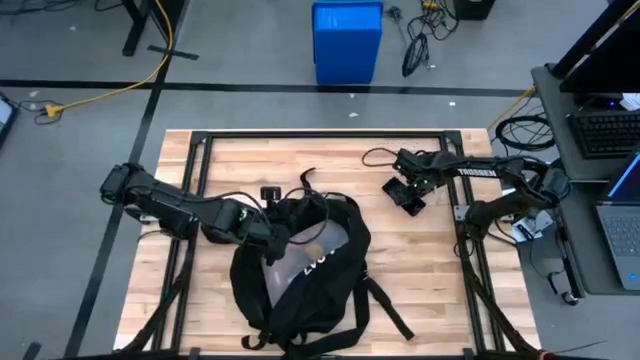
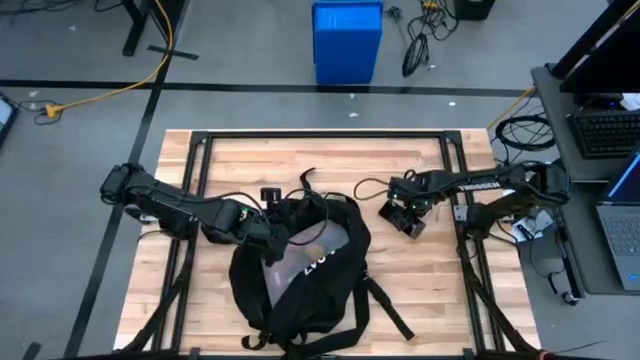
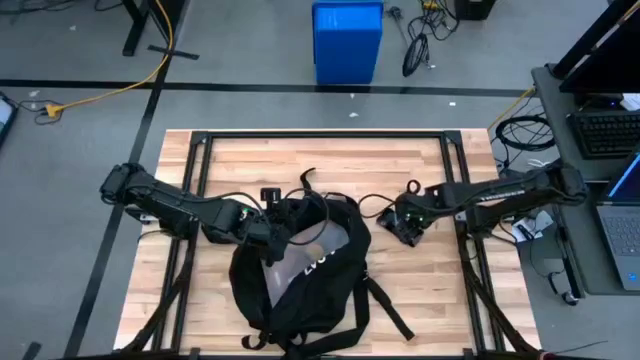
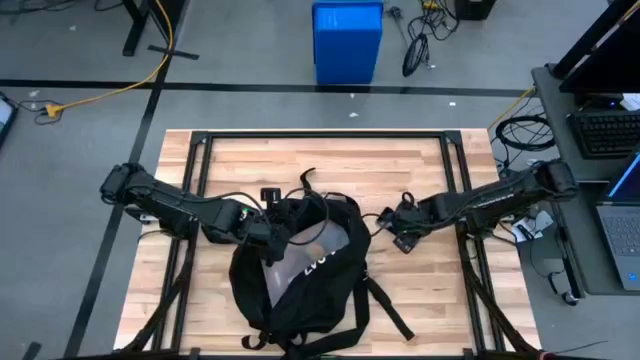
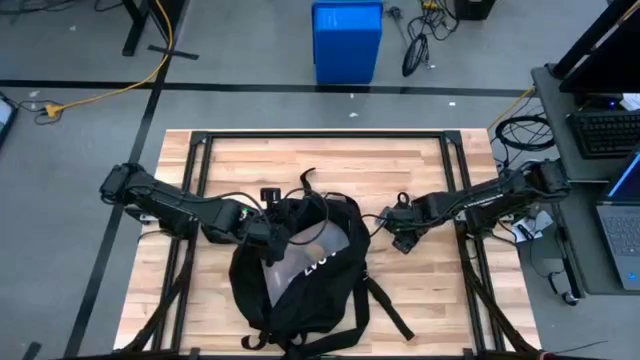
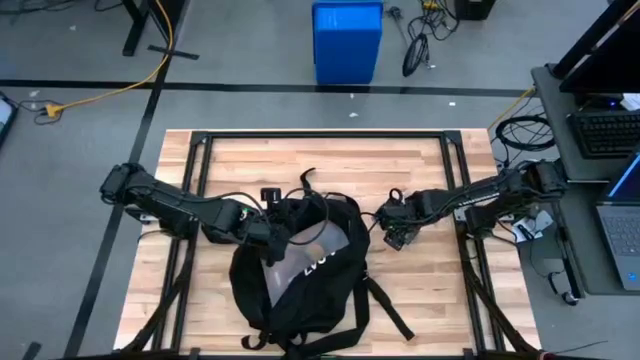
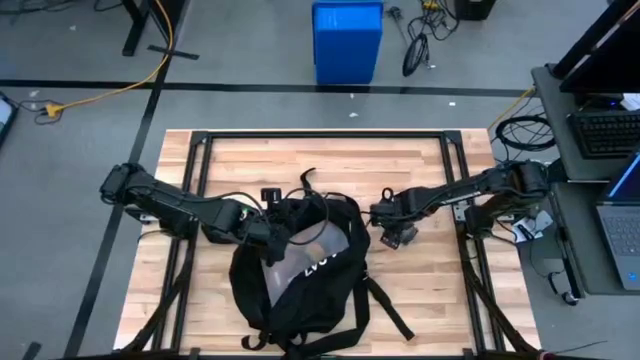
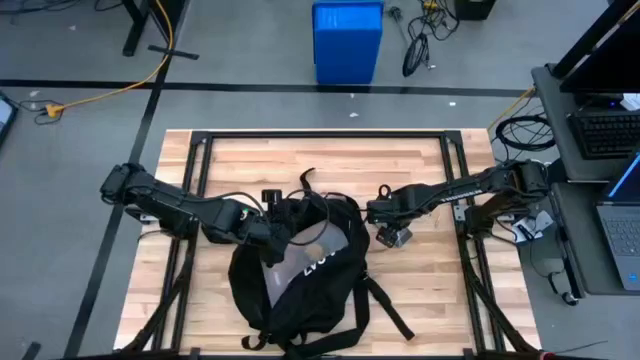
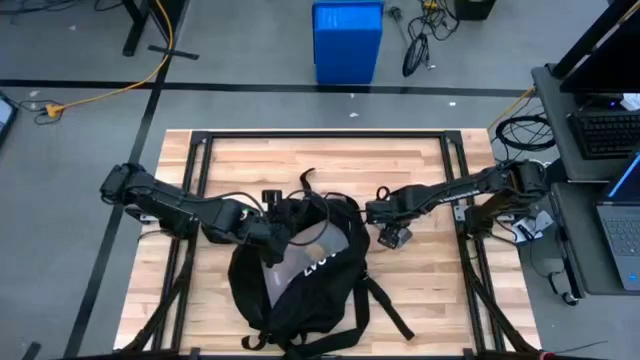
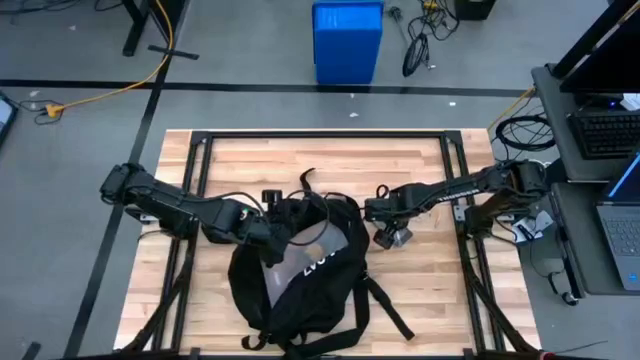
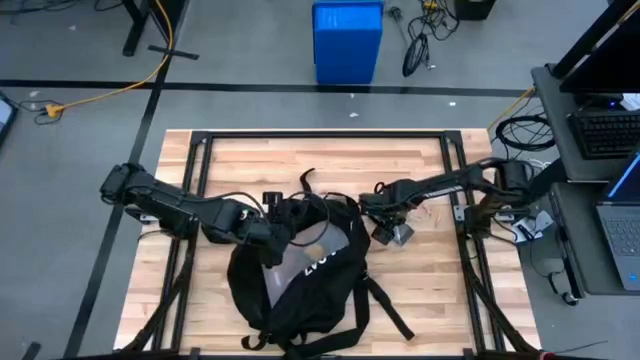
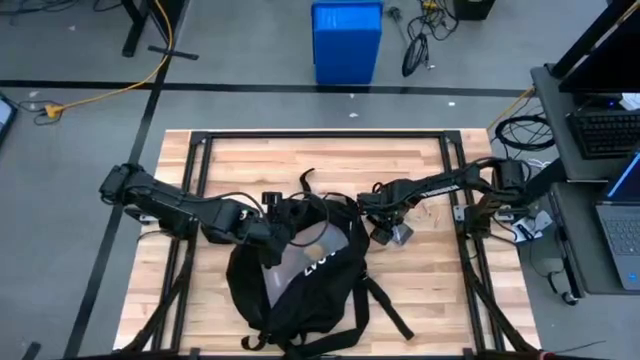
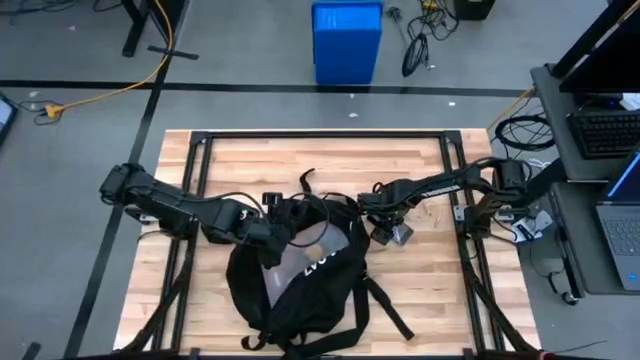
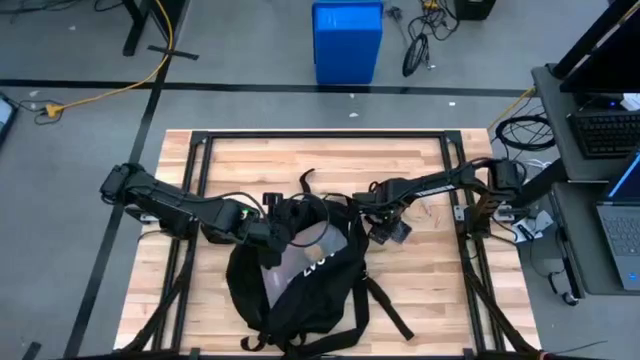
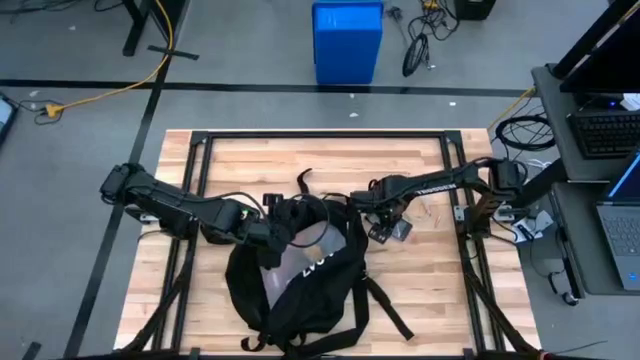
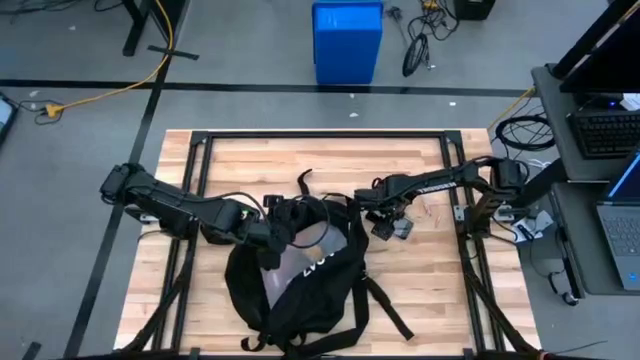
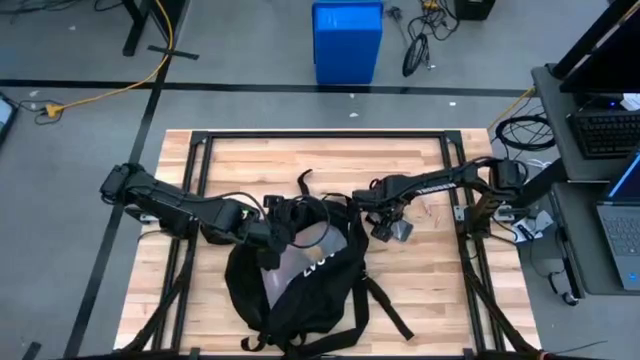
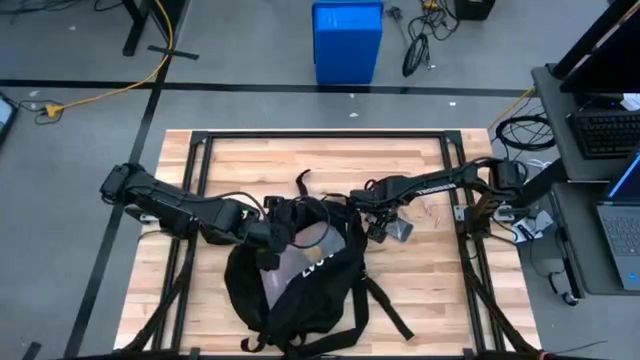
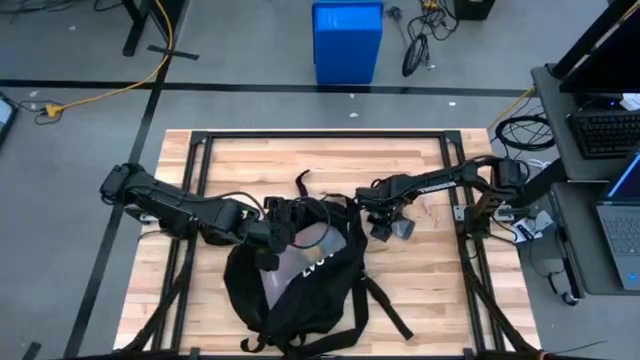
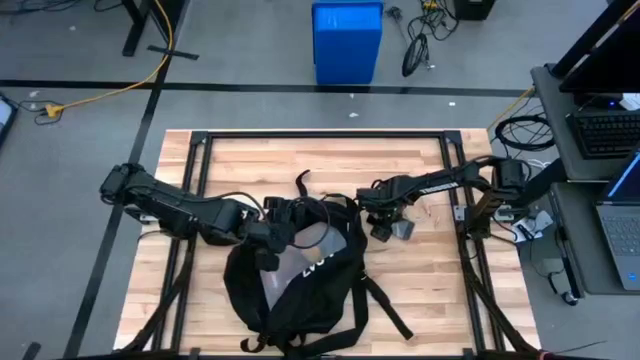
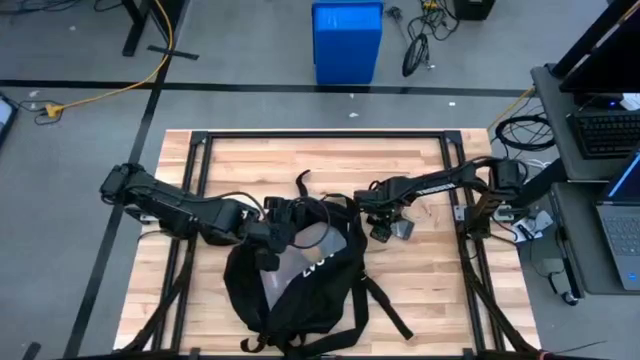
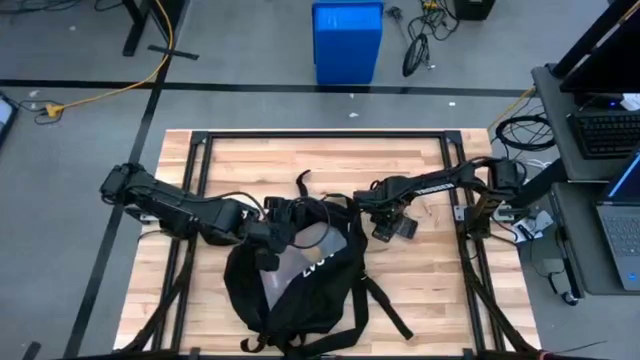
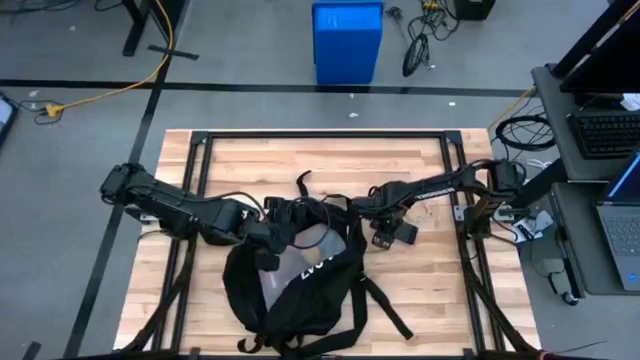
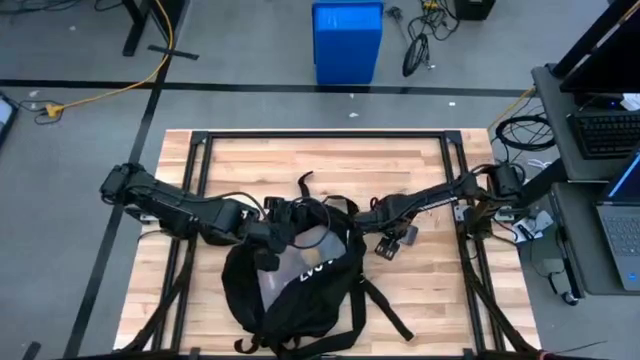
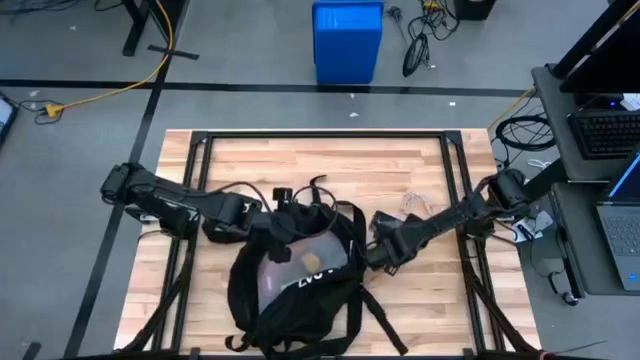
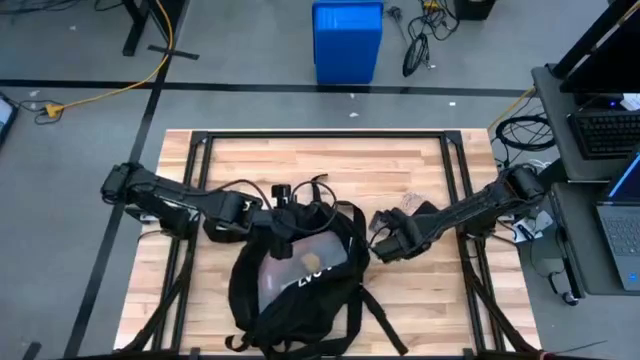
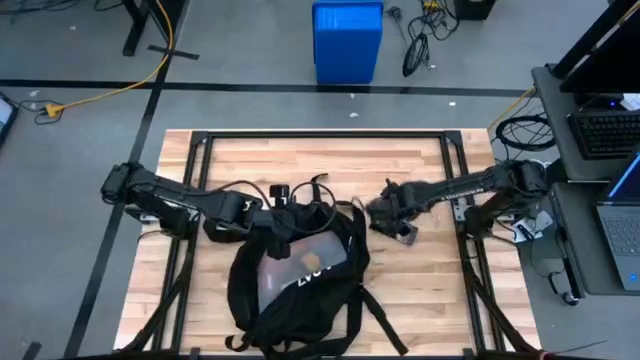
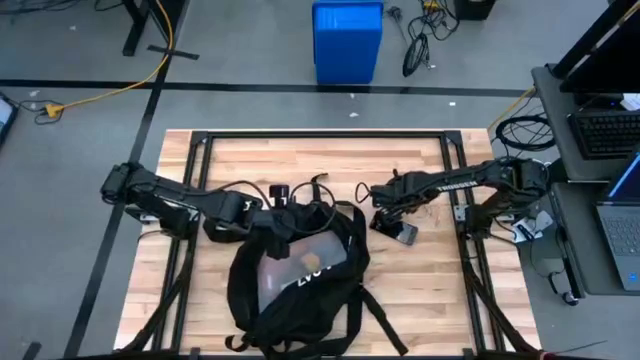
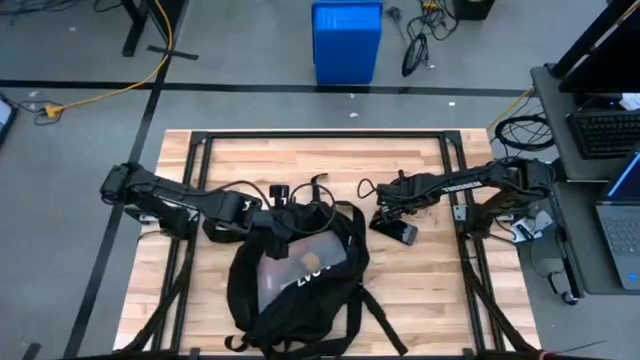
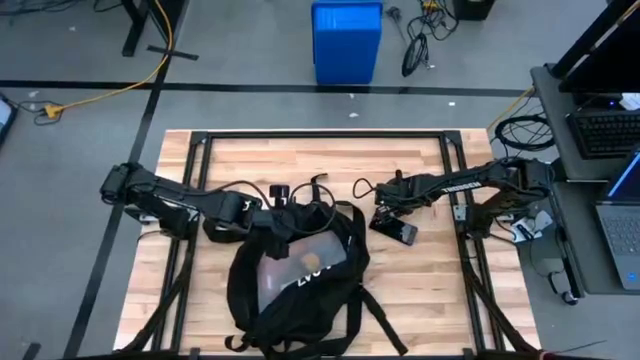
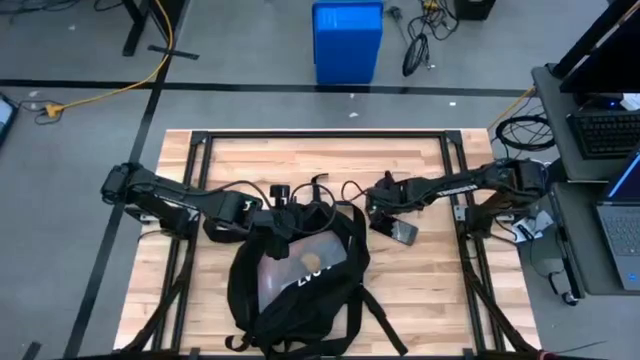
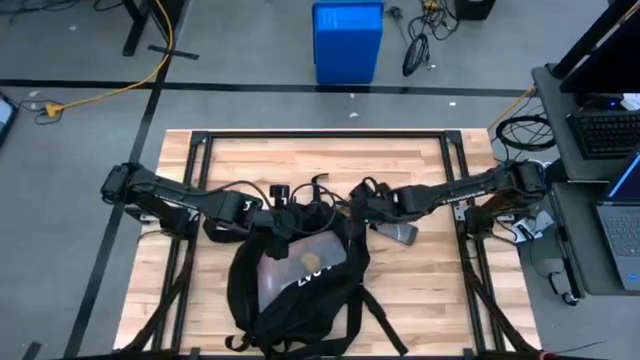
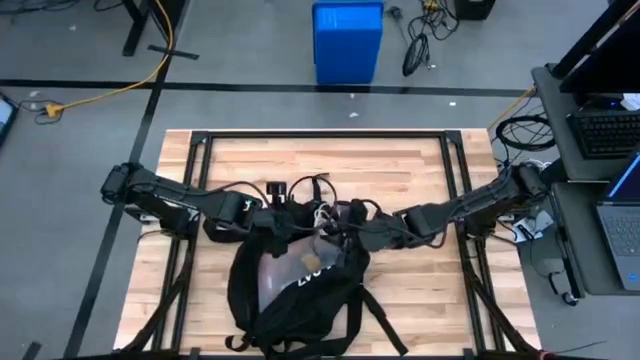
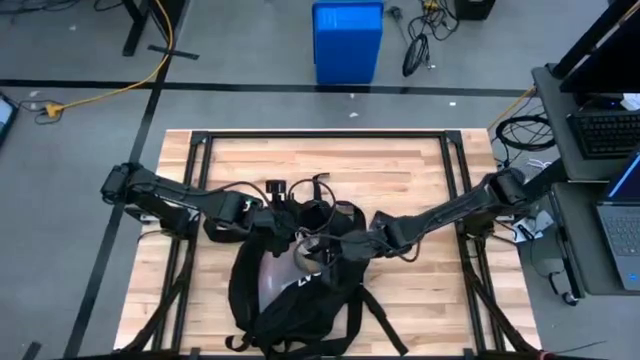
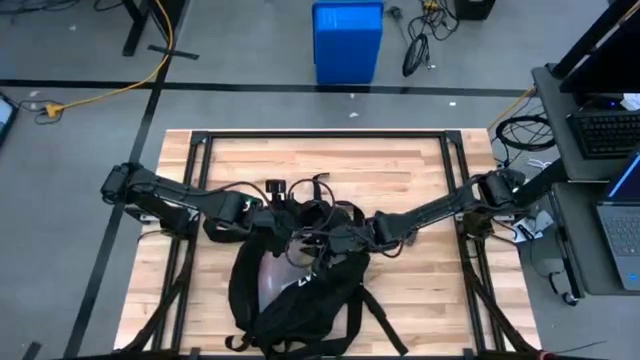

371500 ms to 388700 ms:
Task: Unpack backpack
Put the charger cable into the black backpack

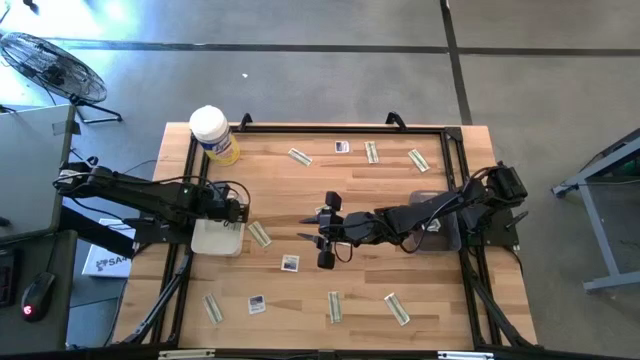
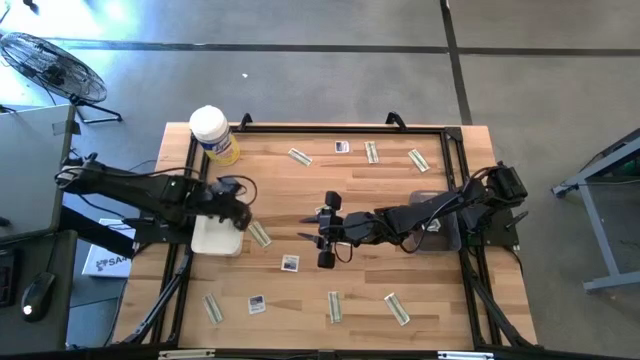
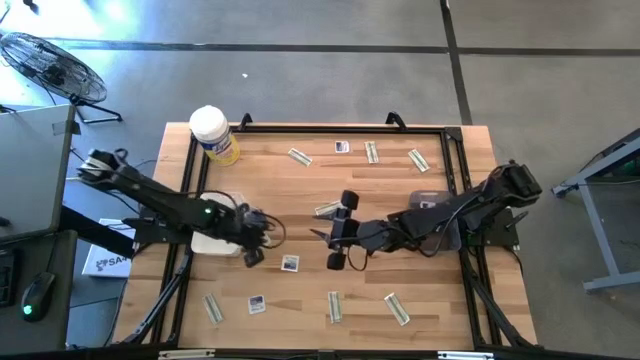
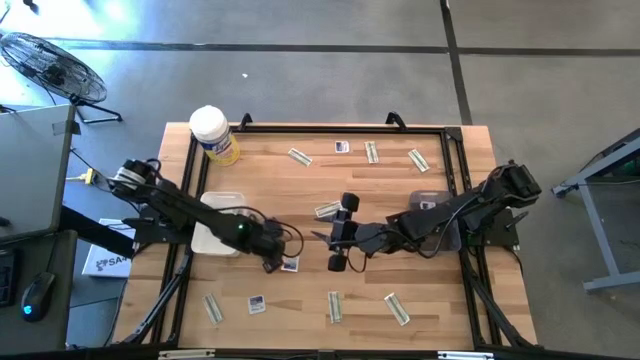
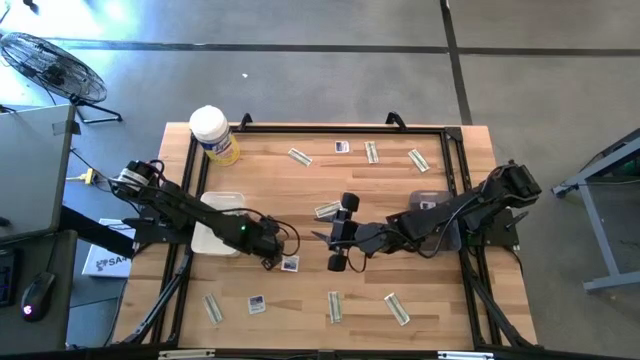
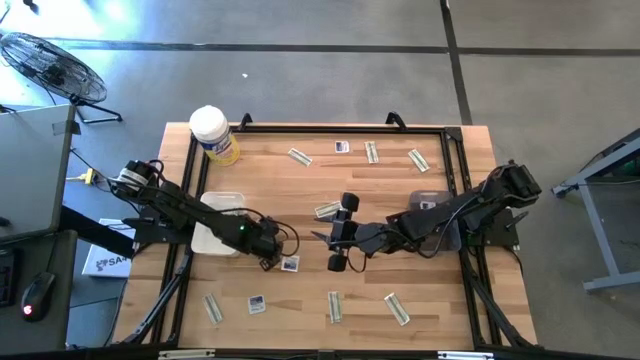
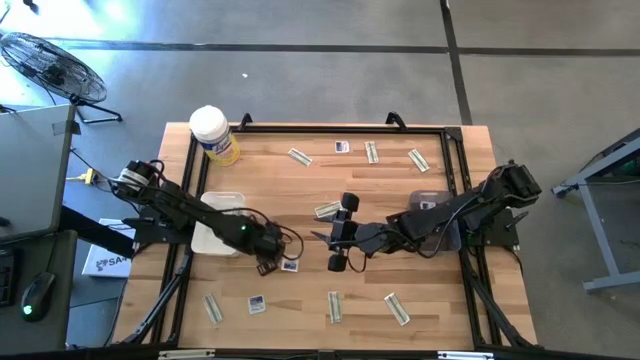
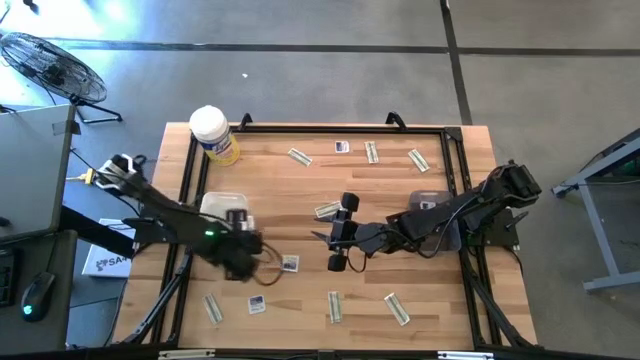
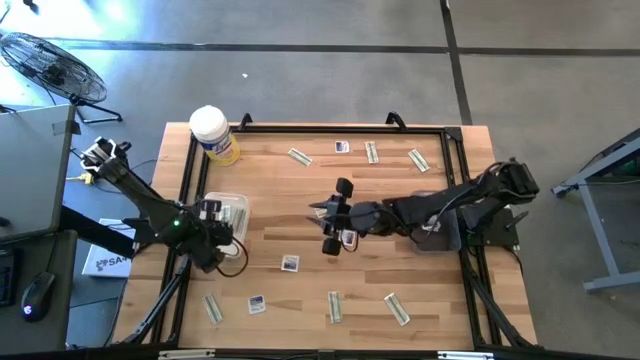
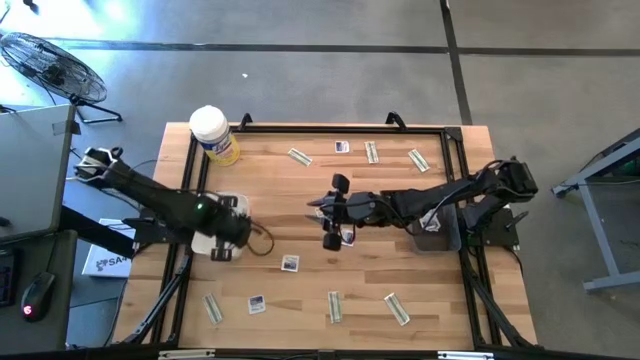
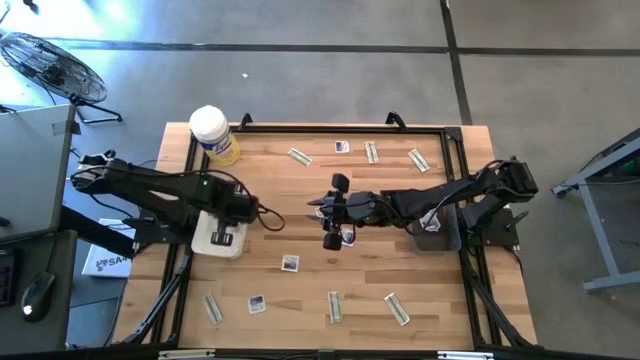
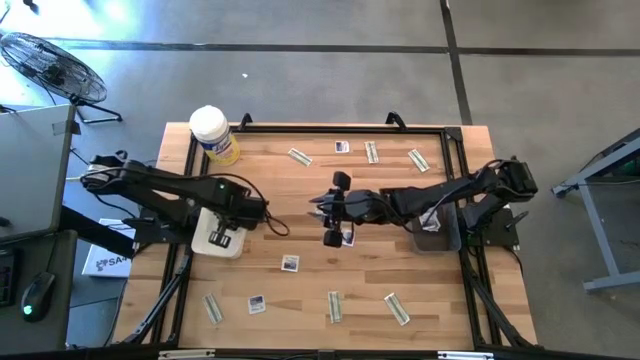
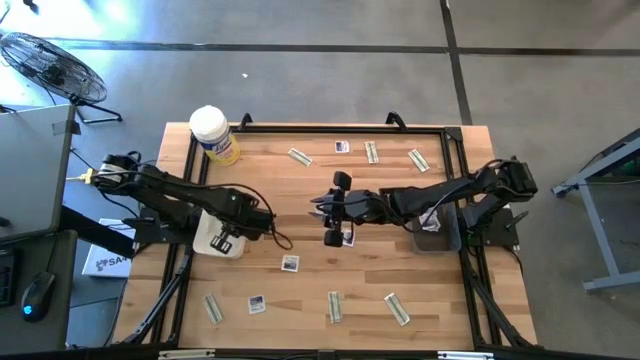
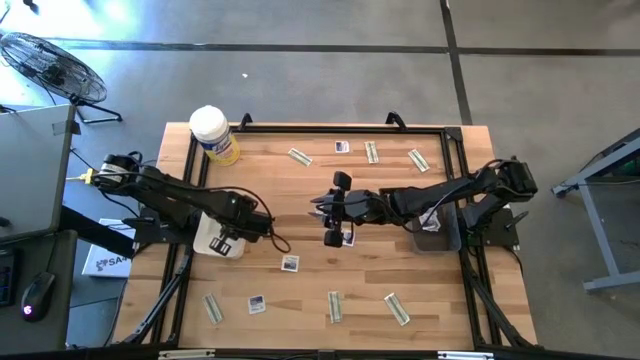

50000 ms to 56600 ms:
Task: Pick & Place First Aid Supplies
Put the green bandage into the white bin
